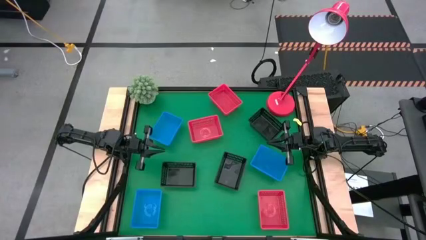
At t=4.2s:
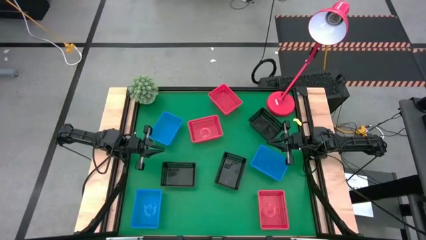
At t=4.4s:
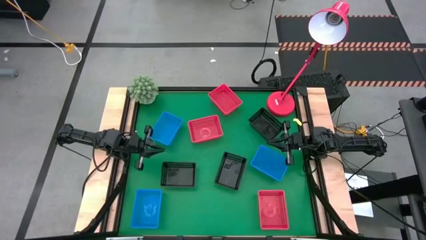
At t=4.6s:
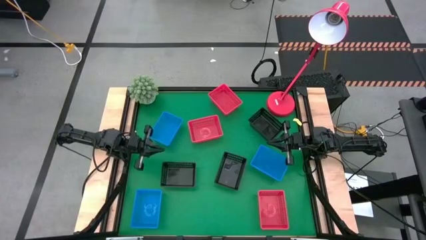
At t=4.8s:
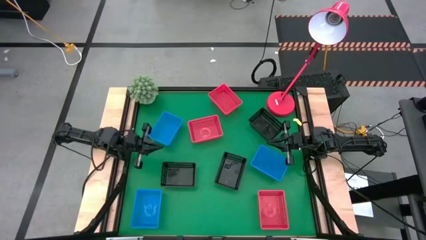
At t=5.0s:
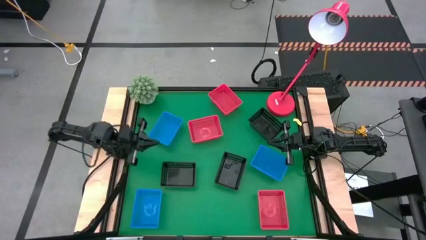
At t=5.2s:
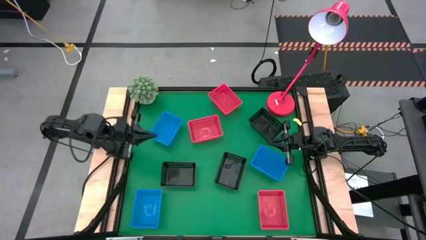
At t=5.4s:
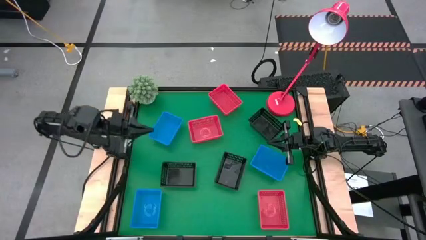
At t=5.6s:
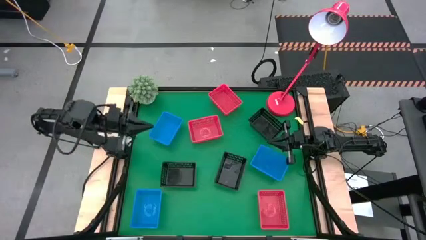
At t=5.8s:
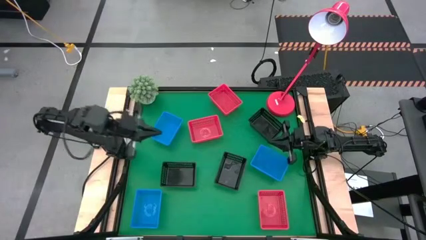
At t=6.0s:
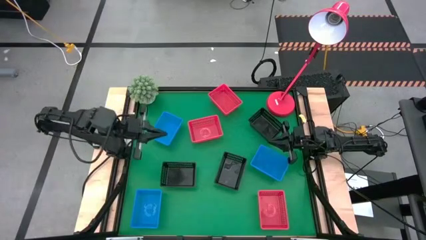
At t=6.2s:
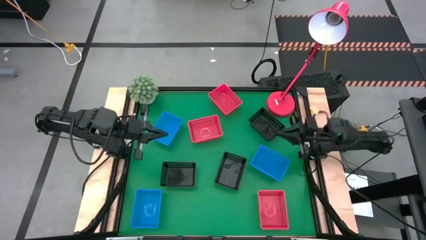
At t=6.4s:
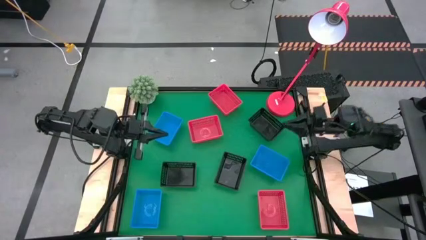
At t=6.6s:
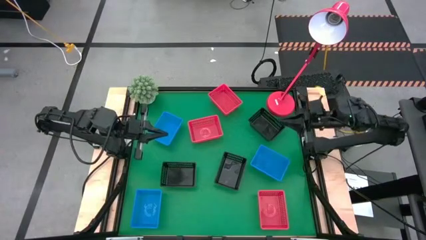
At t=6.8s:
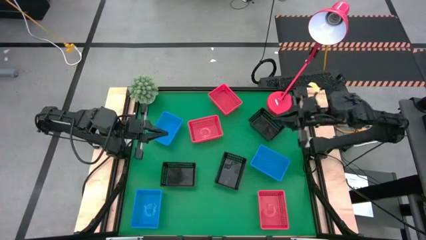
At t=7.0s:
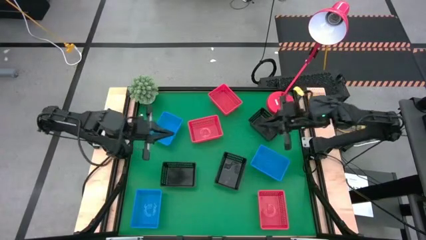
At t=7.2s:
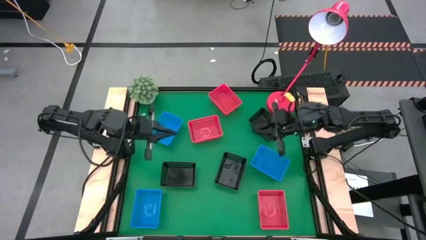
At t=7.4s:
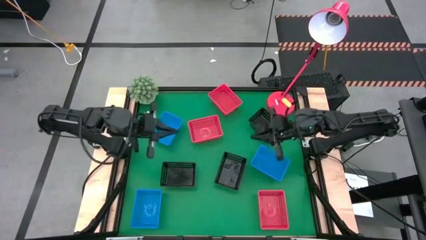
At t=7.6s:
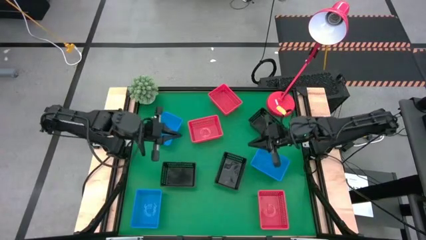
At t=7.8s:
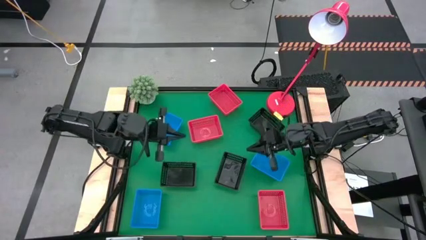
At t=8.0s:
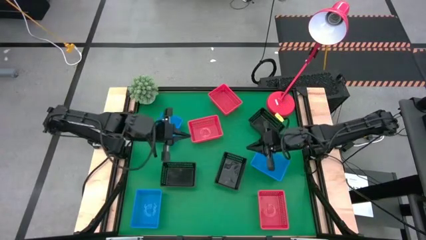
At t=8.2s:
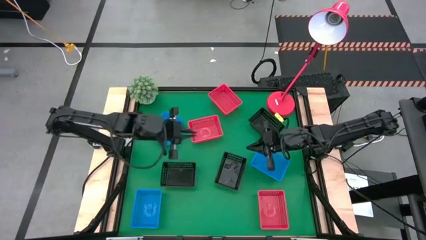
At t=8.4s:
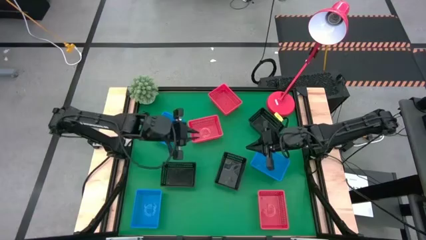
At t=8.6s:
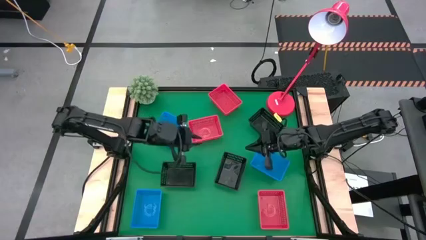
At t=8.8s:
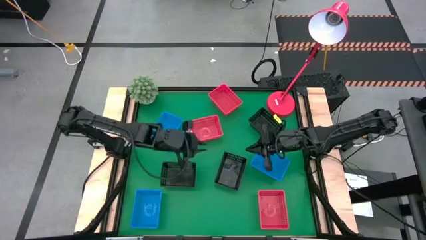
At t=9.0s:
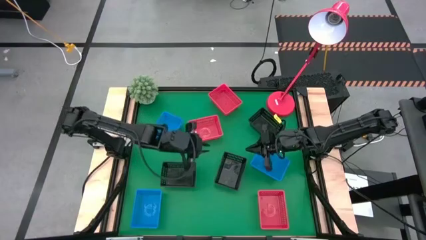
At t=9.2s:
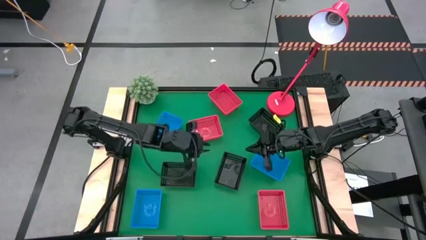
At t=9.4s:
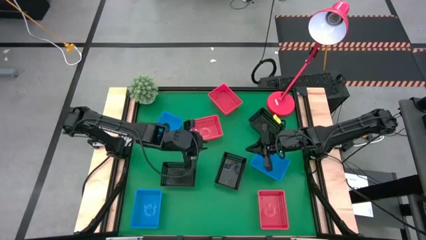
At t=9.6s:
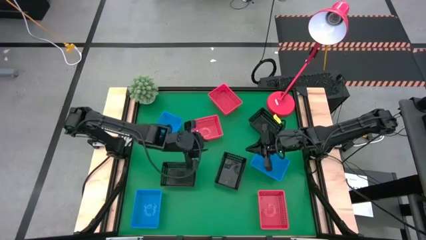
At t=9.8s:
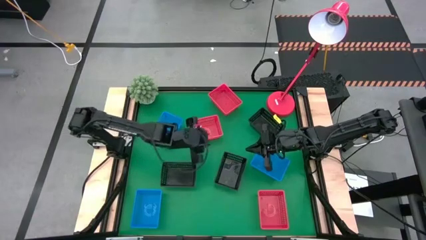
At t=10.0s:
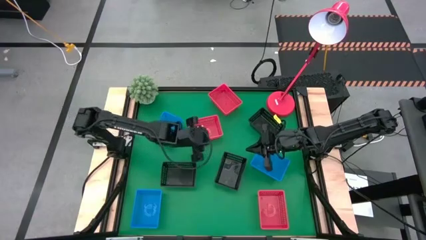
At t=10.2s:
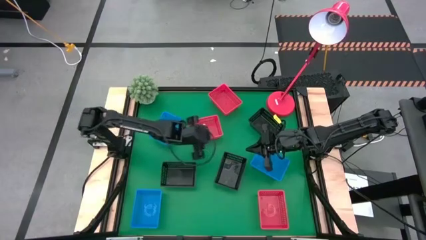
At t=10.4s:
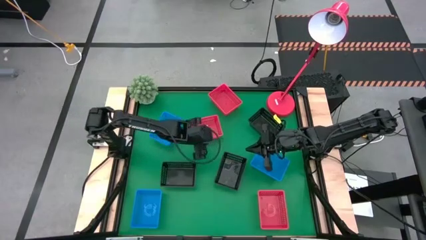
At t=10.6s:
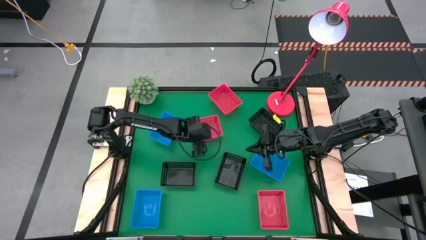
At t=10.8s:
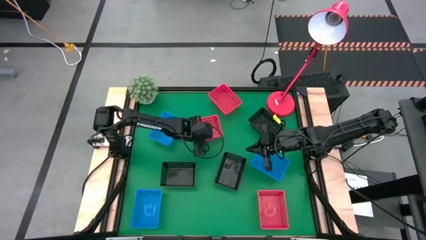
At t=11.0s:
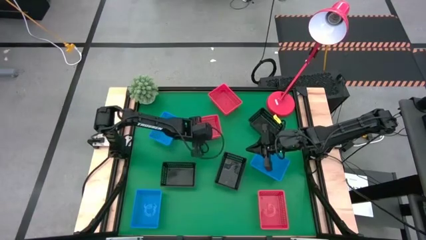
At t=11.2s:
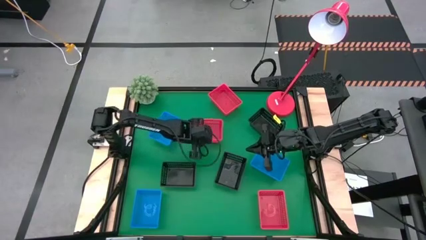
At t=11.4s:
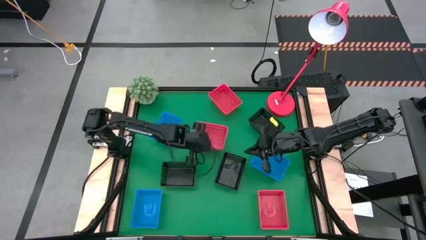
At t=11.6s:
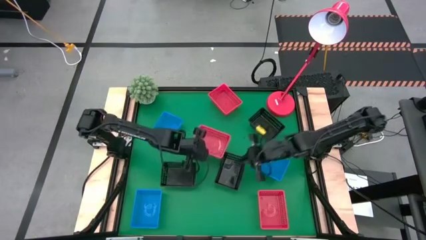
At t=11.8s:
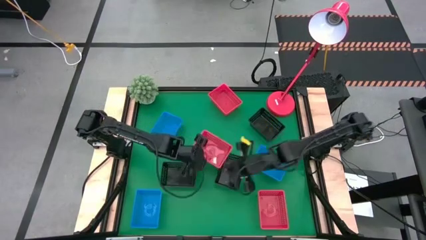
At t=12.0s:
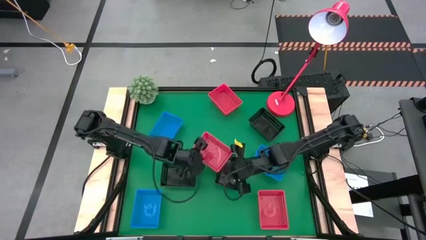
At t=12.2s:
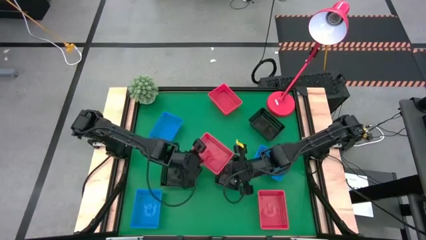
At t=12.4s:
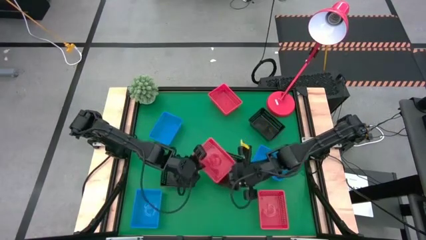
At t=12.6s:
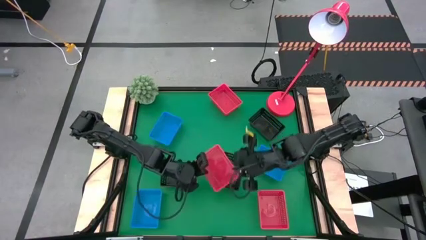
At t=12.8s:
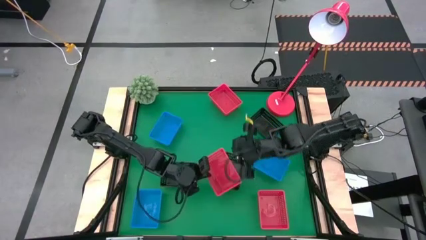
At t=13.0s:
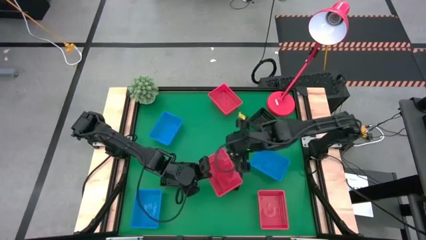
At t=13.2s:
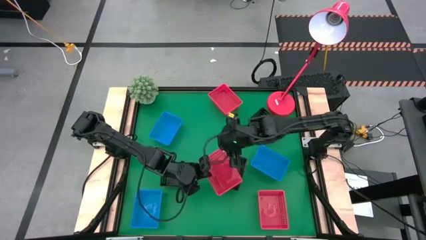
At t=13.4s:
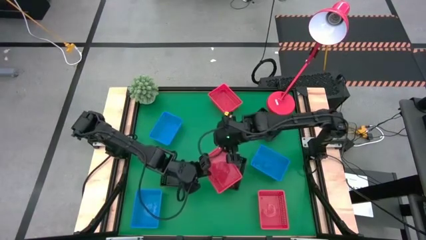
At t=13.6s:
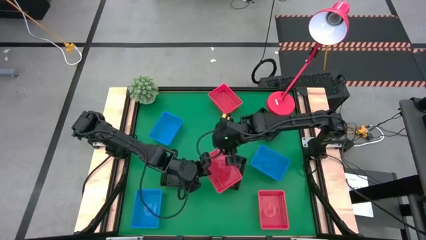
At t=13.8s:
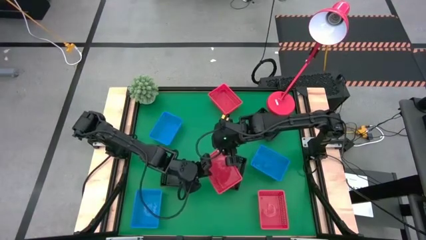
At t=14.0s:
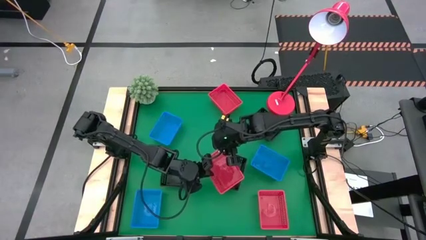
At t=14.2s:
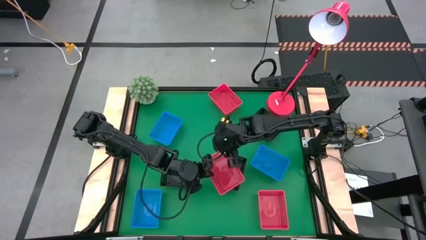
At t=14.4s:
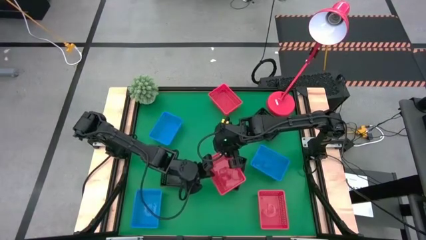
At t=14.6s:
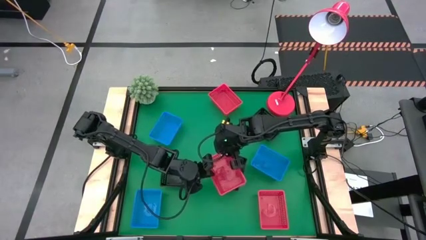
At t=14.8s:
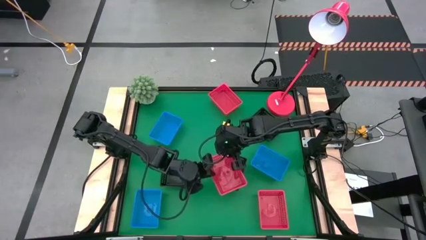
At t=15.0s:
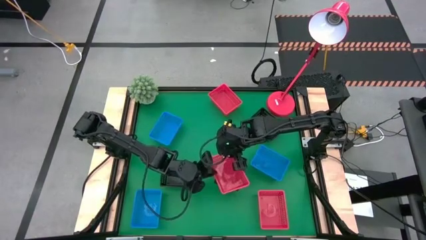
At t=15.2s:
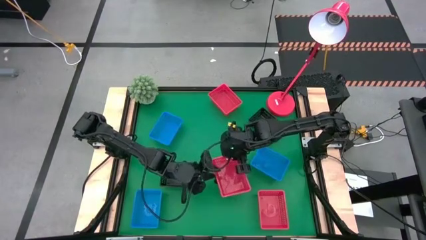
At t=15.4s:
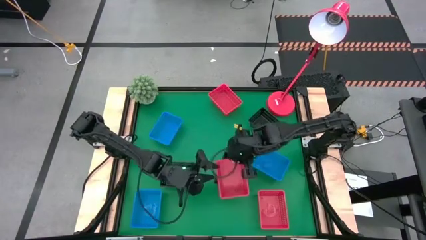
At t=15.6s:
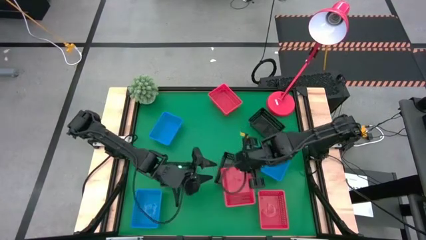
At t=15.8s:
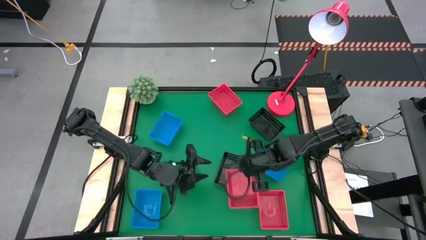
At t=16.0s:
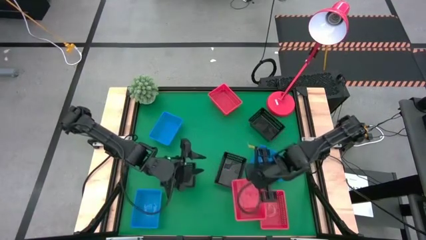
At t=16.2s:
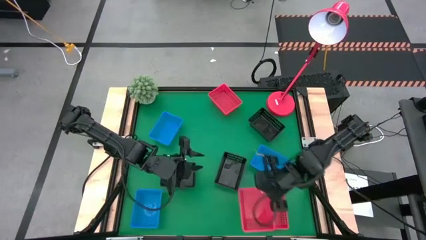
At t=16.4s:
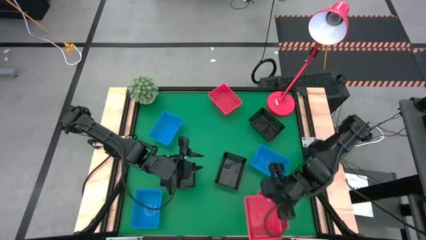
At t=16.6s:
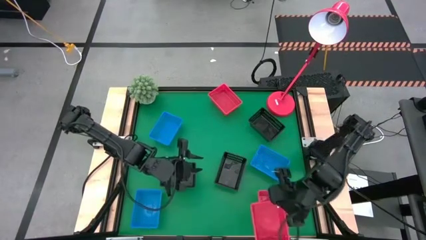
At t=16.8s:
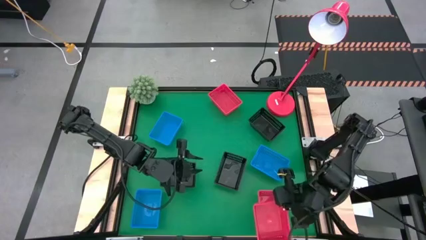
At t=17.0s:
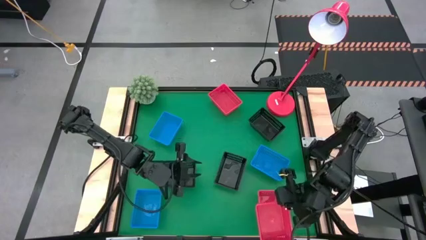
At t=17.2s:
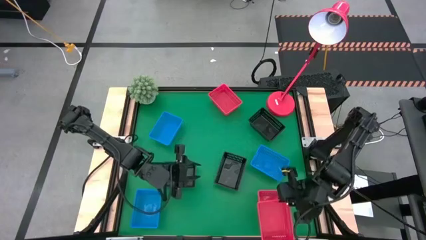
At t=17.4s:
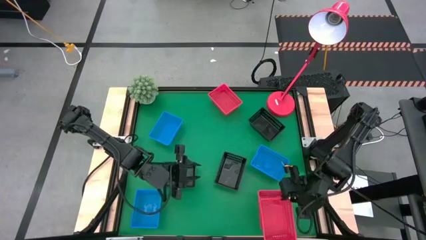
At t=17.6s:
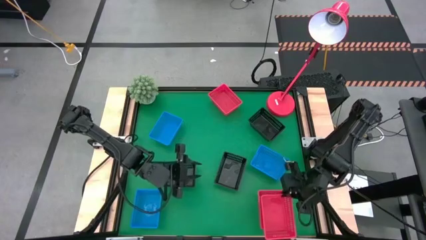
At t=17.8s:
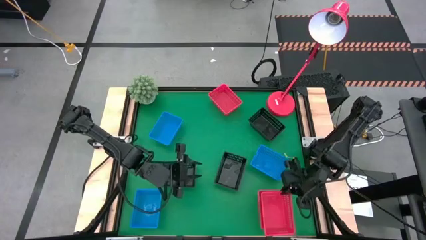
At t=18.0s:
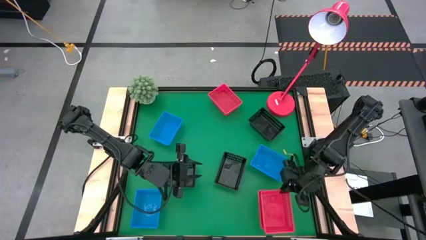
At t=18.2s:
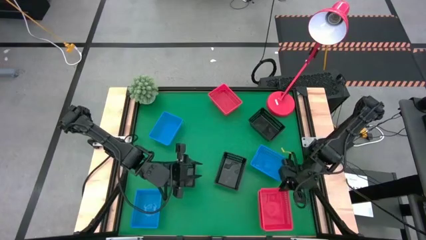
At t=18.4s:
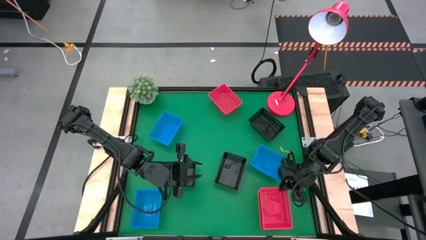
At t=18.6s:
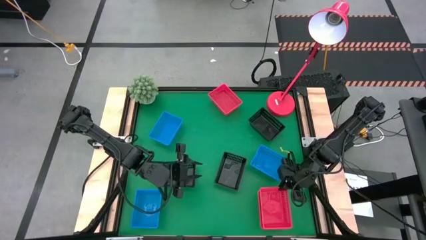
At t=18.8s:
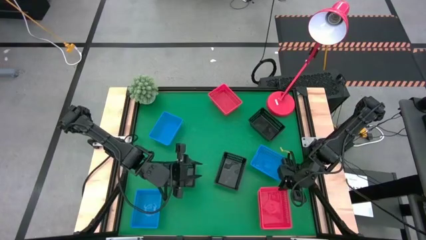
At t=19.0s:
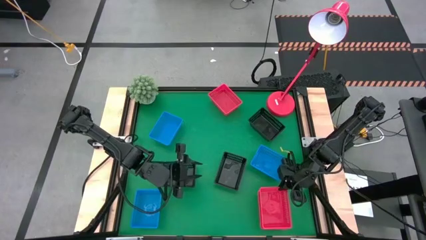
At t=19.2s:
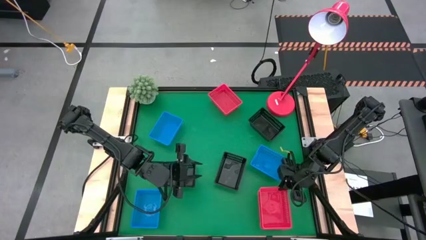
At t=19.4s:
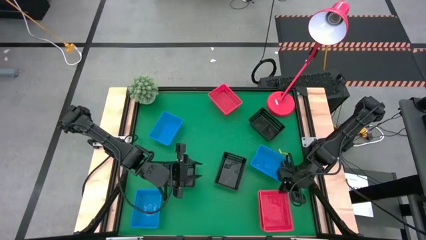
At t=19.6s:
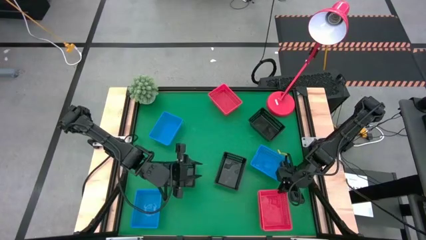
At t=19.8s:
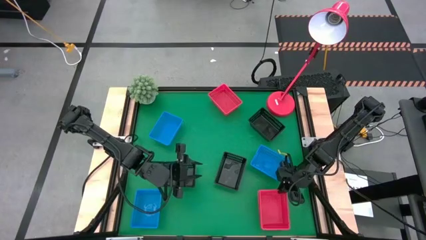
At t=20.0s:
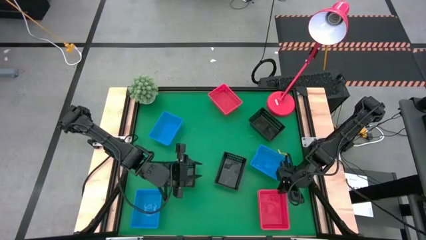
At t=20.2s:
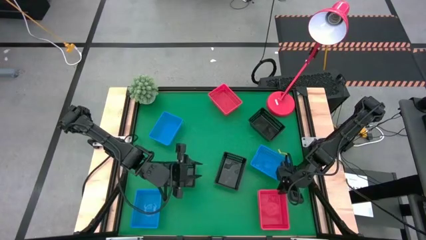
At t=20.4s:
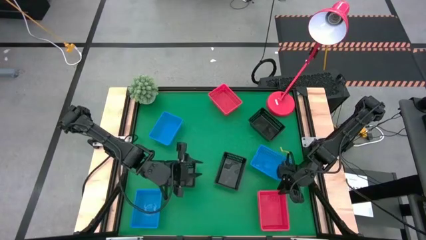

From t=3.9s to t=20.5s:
Stack the middle red bin on the bottom red bin
